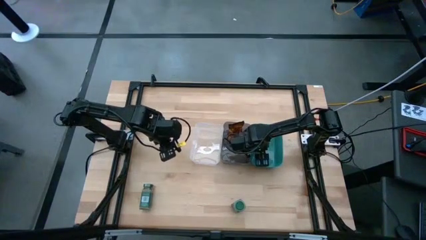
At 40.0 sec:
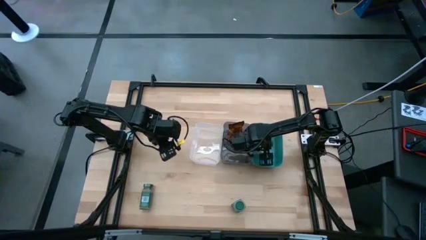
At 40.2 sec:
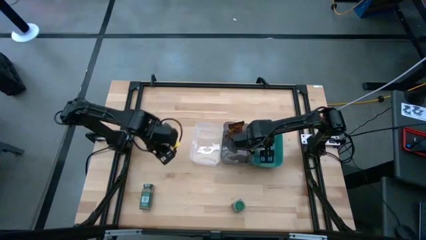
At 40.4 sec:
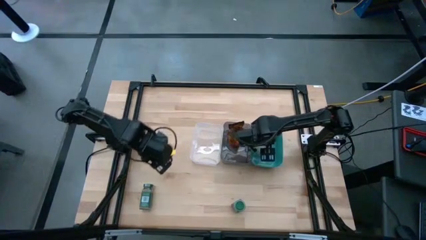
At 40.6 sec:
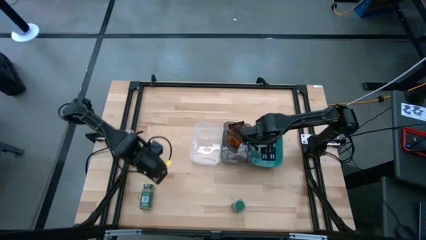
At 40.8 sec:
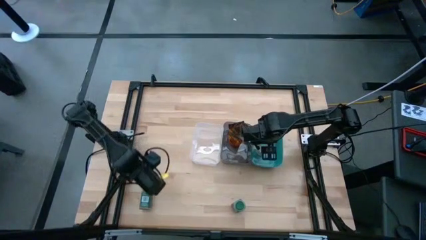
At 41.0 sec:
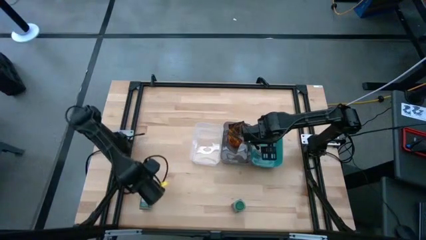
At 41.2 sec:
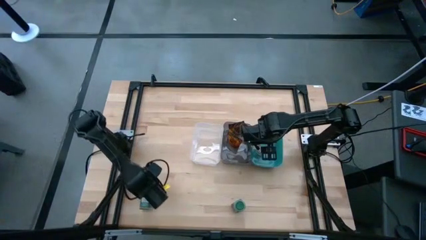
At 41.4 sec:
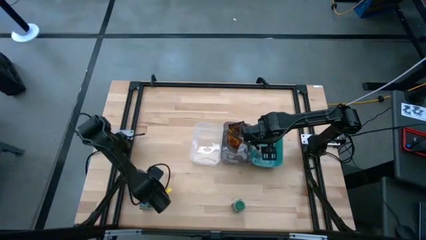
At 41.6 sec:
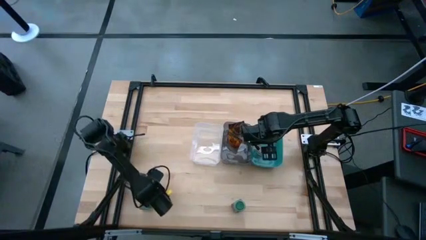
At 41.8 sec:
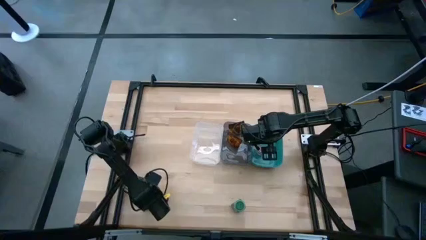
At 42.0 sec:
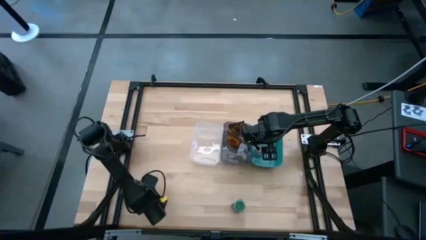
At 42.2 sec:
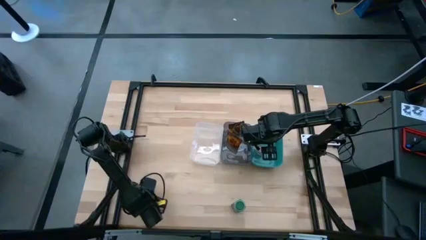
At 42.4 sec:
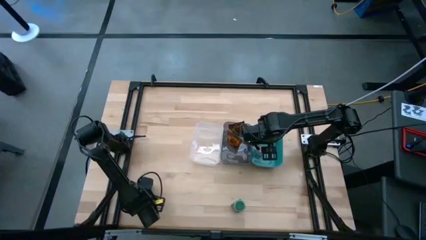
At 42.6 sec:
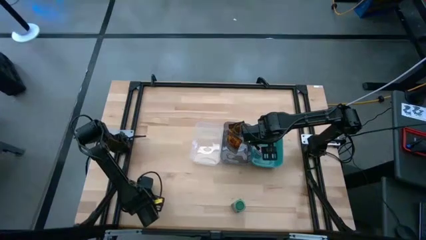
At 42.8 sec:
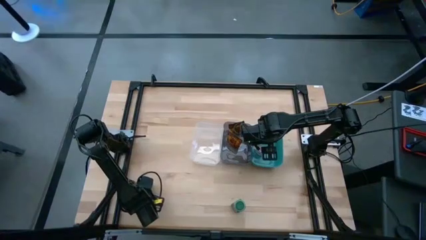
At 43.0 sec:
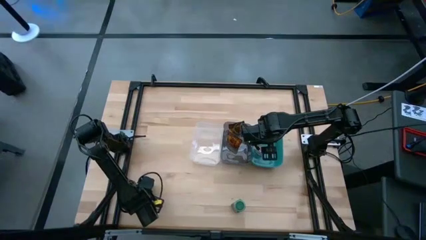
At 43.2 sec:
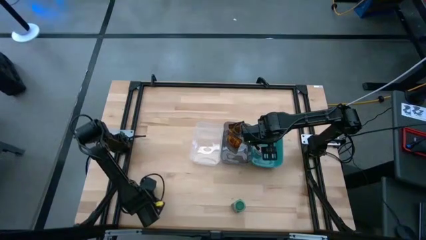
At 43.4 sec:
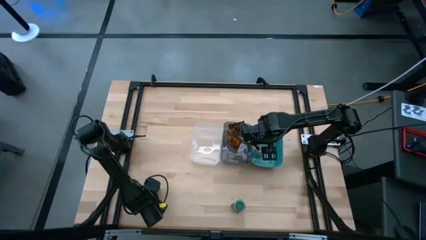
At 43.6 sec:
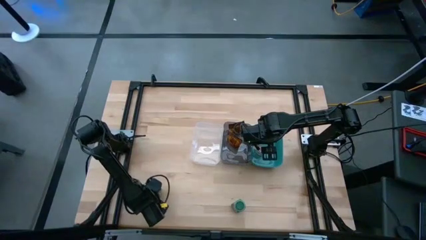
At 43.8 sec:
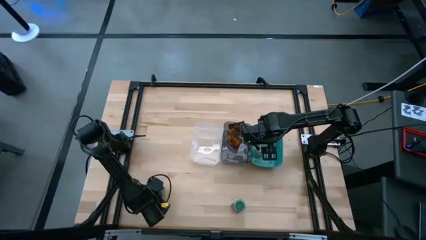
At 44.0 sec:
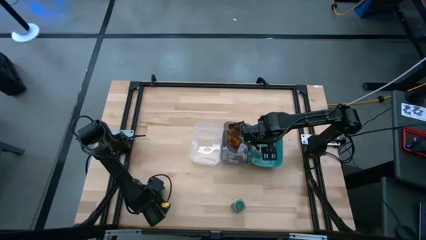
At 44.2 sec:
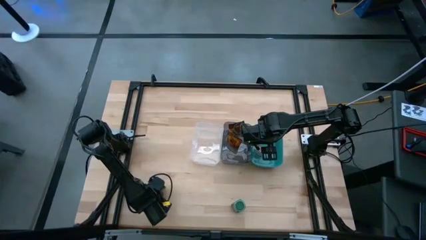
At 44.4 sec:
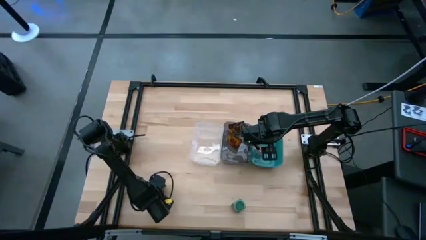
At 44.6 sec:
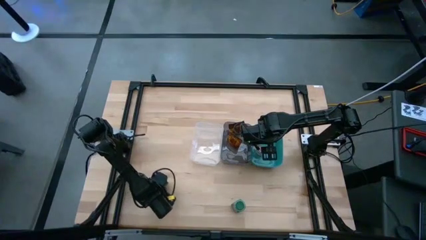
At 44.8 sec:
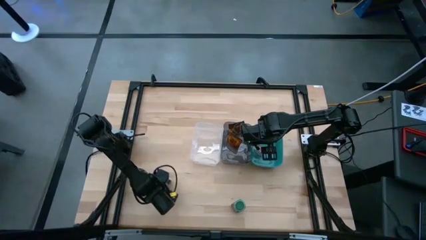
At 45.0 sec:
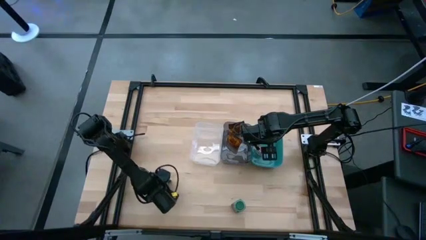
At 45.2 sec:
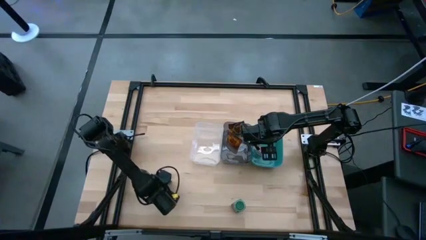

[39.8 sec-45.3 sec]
Task: Sort spices by type
Put the left green seasoning bottle into the transparent bin

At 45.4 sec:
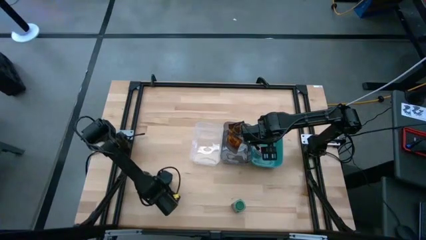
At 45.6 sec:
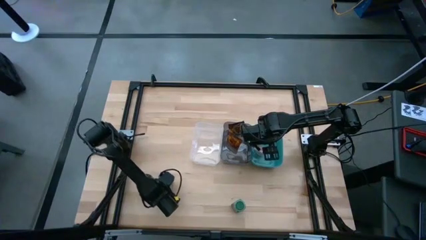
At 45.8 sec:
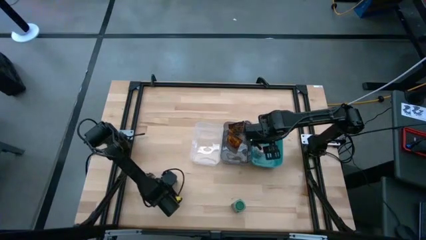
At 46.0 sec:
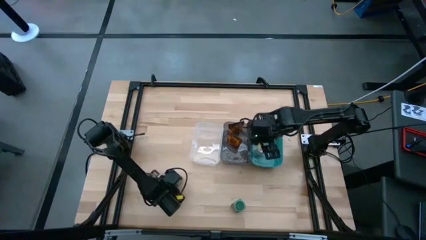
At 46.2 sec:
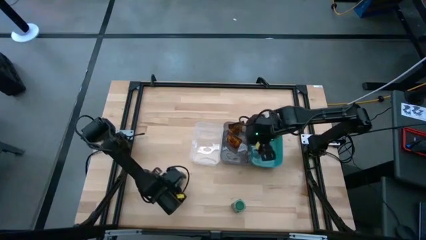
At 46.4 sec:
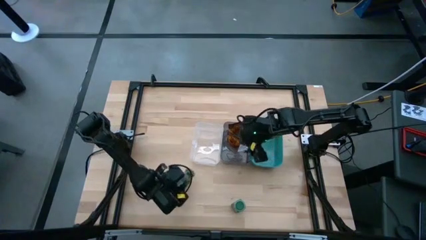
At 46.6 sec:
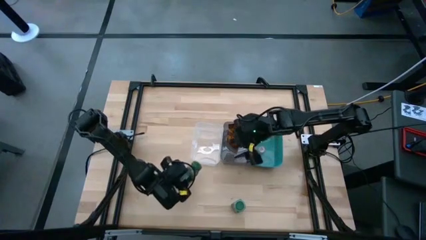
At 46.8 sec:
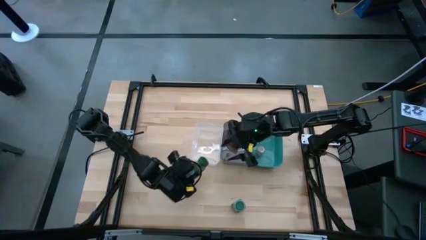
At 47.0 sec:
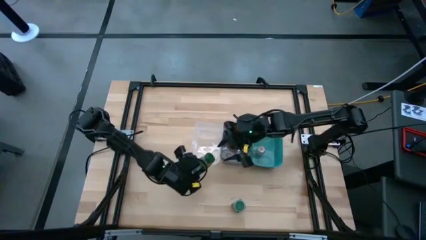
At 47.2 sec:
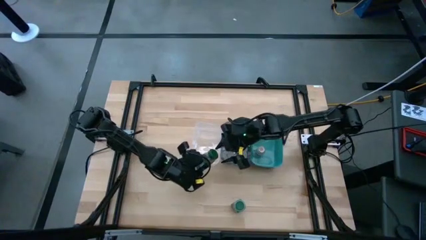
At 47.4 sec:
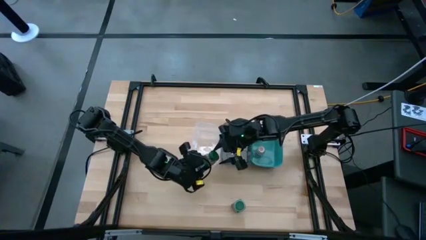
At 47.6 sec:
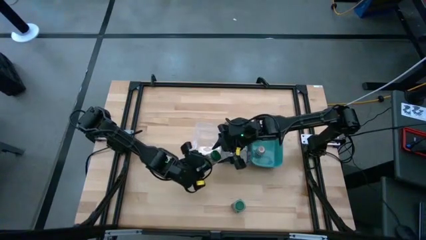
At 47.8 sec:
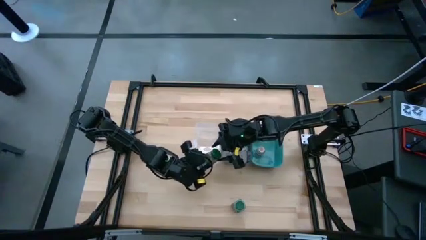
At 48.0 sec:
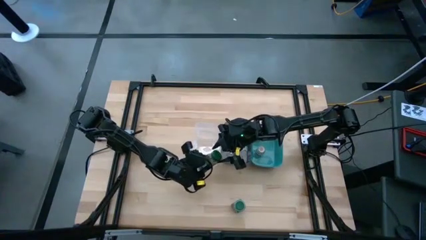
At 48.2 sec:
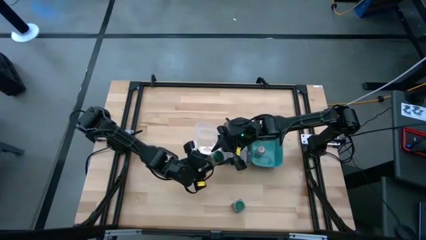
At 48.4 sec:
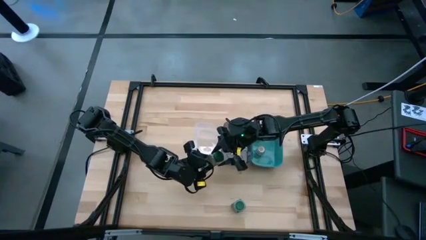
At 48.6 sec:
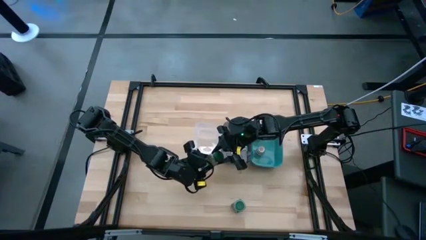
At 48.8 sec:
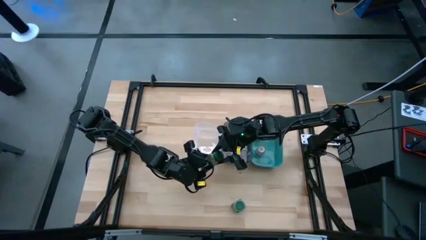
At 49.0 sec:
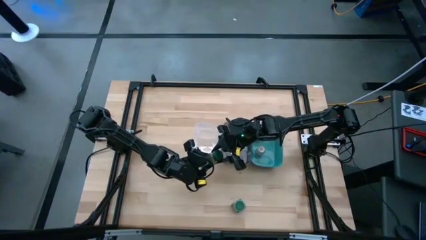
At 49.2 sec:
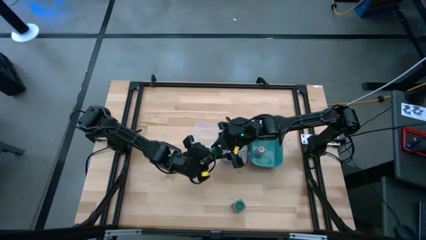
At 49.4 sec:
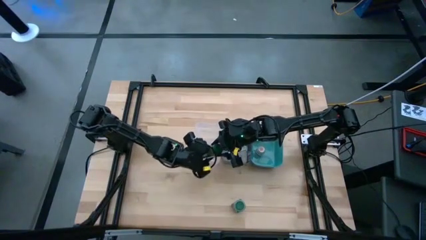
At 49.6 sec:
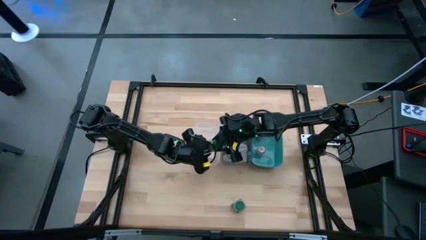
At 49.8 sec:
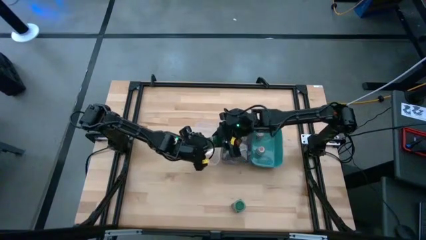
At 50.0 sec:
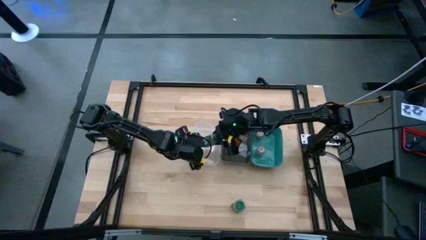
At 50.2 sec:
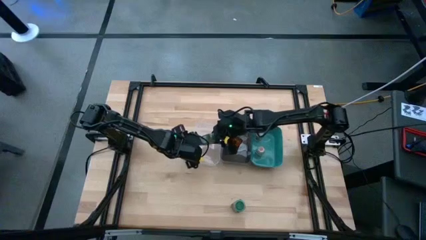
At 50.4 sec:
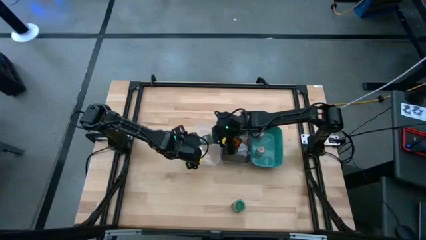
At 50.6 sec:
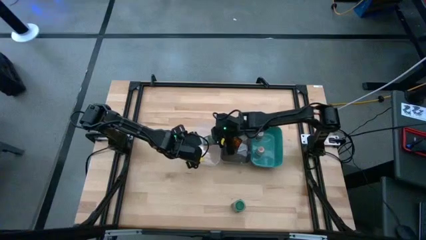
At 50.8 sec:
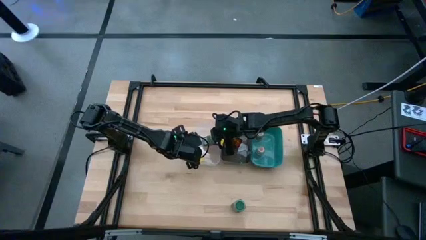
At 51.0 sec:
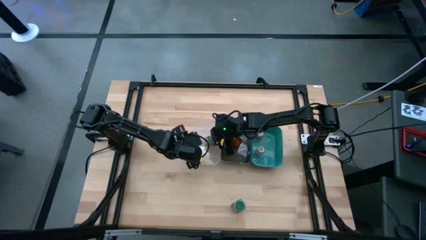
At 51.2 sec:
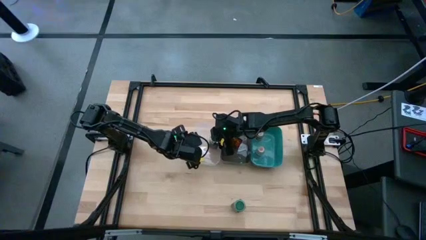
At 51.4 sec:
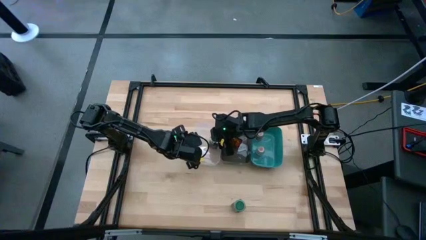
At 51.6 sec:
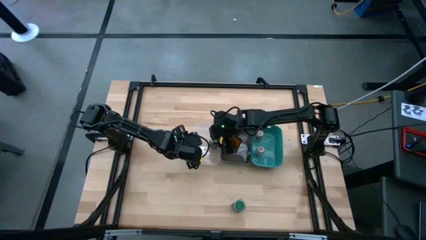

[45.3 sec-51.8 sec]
Put the left green seasoning bottle into the transparent bin
